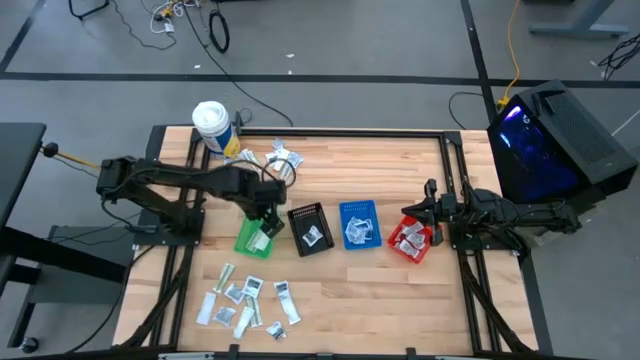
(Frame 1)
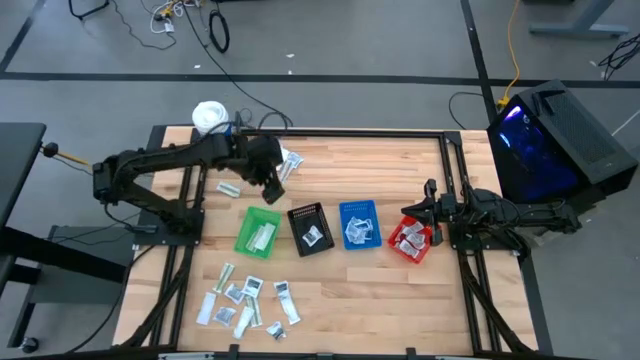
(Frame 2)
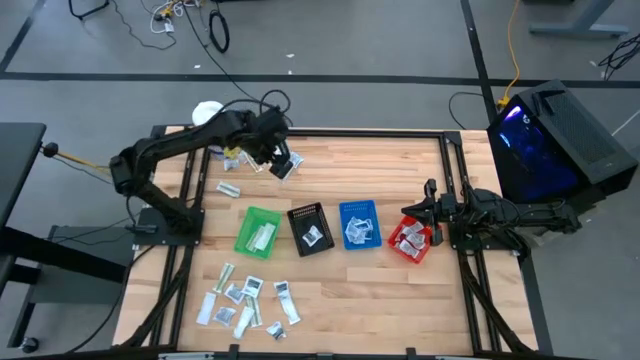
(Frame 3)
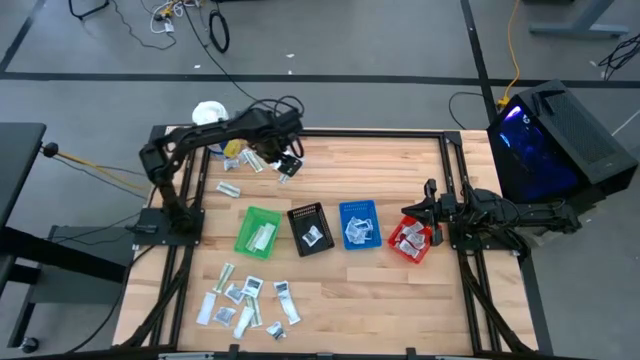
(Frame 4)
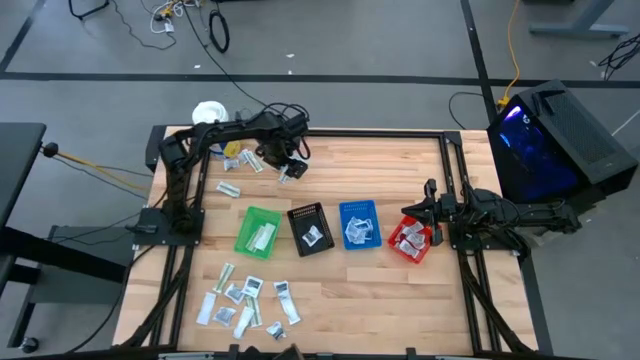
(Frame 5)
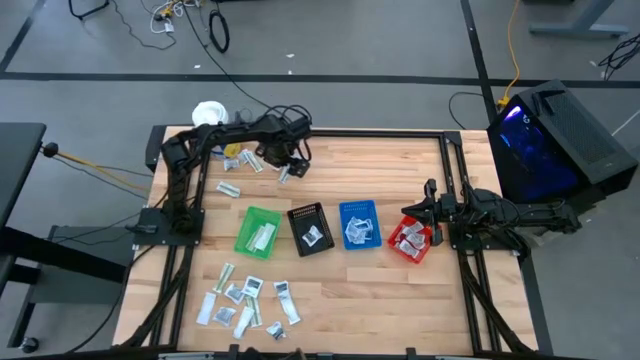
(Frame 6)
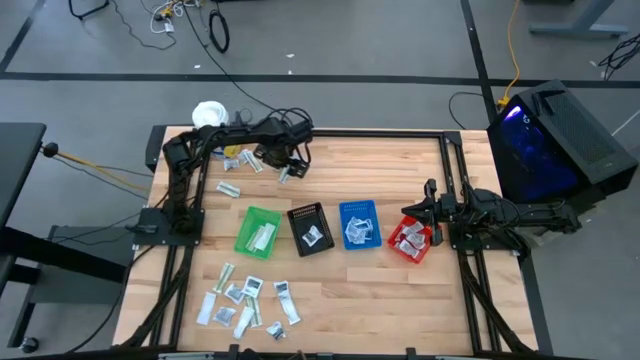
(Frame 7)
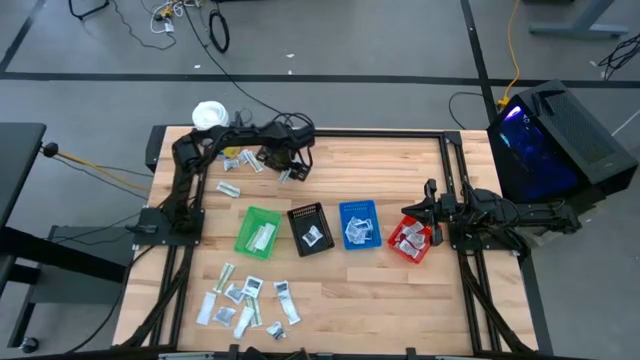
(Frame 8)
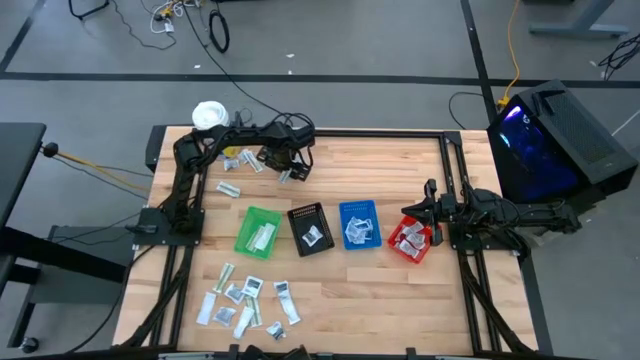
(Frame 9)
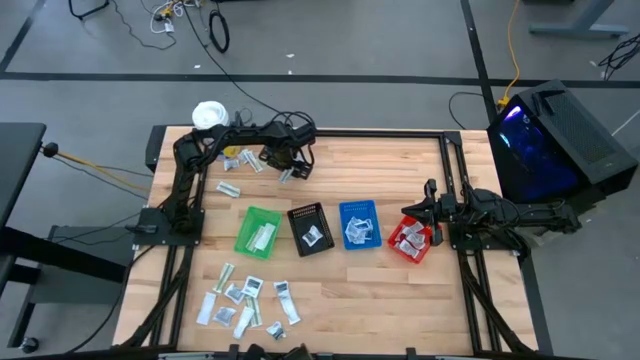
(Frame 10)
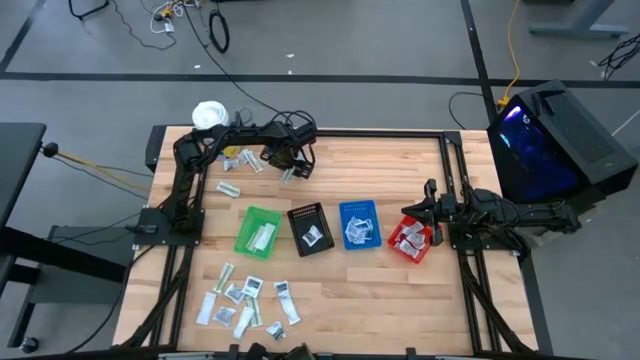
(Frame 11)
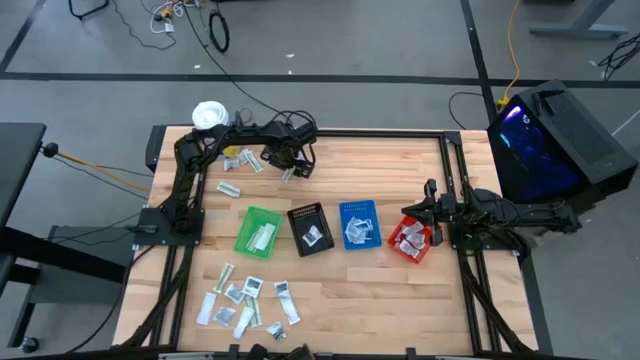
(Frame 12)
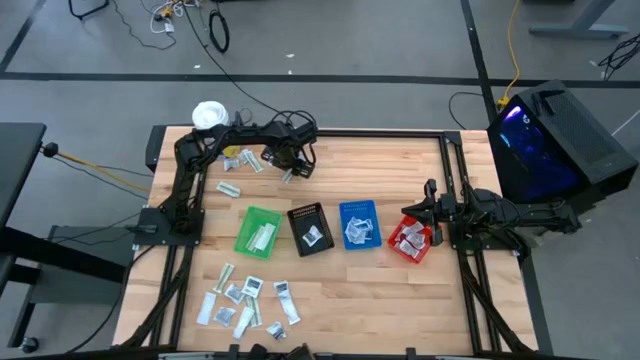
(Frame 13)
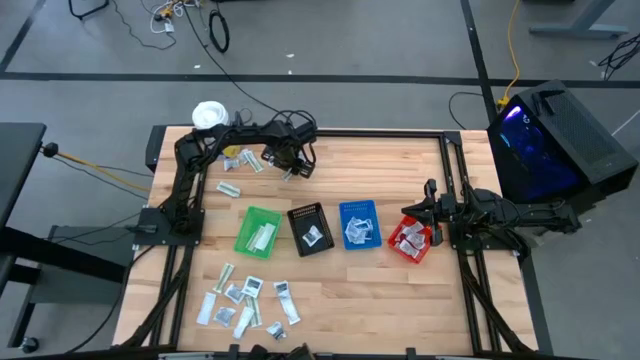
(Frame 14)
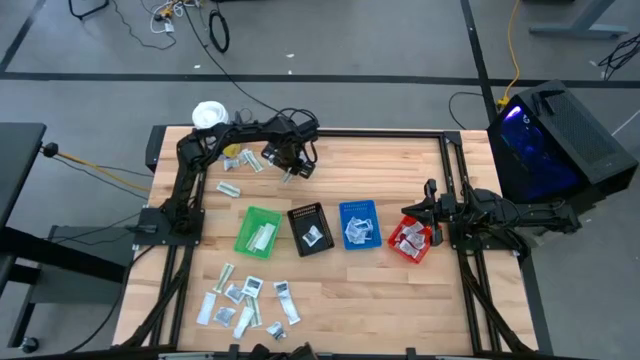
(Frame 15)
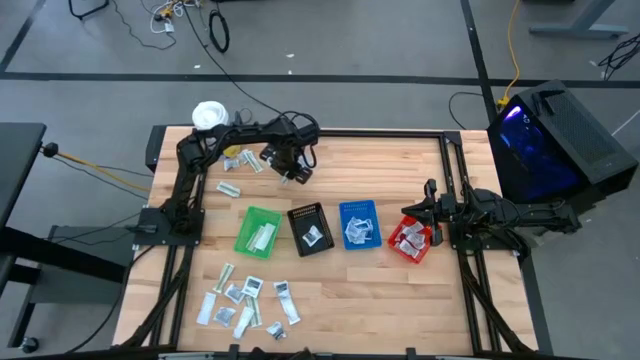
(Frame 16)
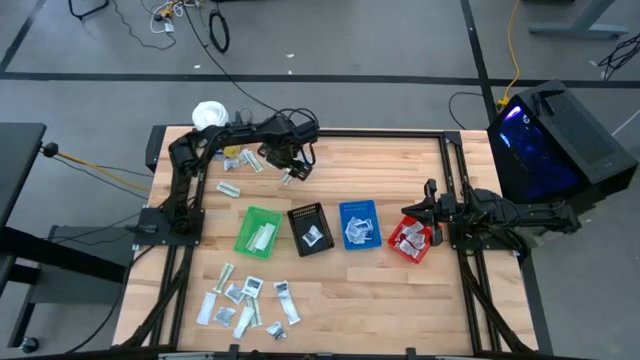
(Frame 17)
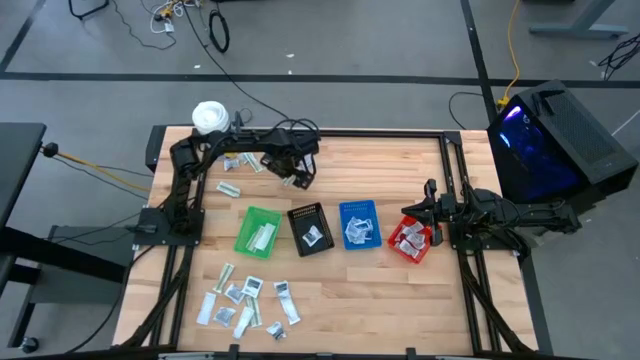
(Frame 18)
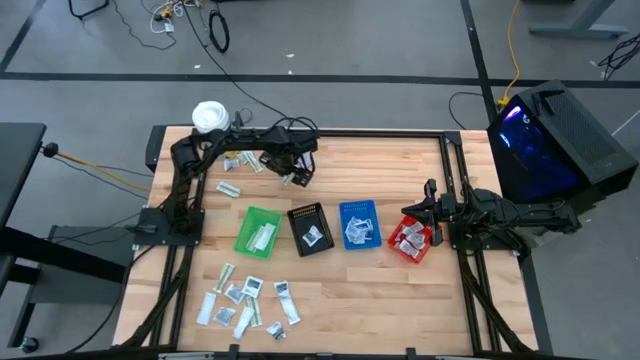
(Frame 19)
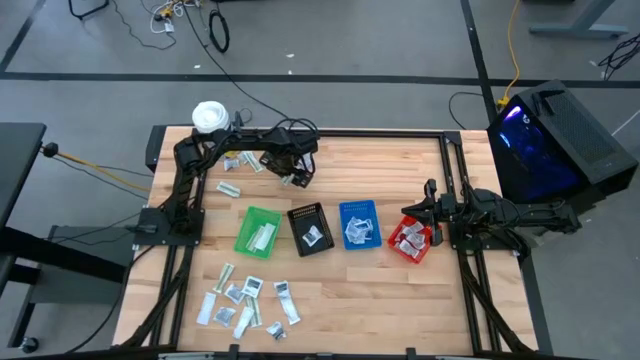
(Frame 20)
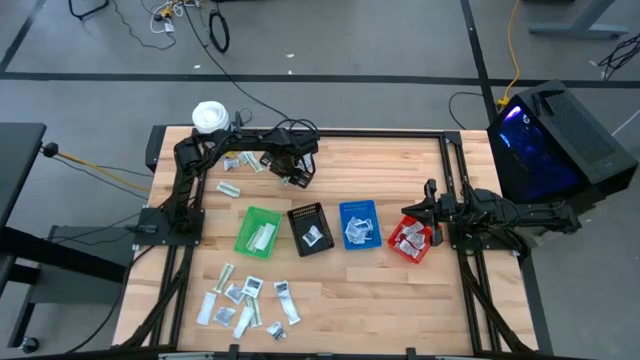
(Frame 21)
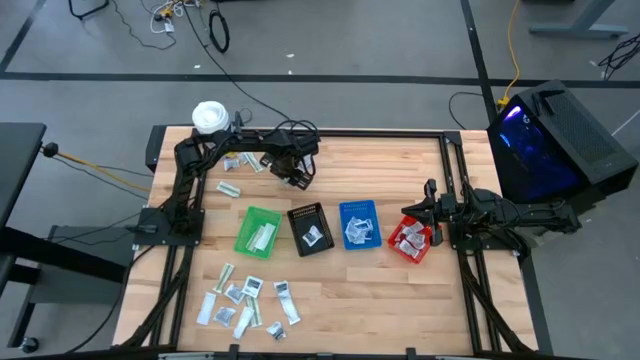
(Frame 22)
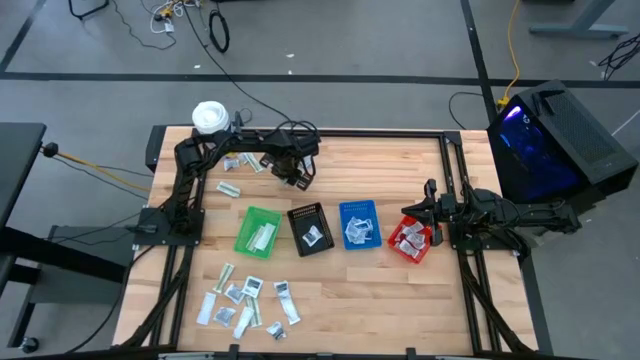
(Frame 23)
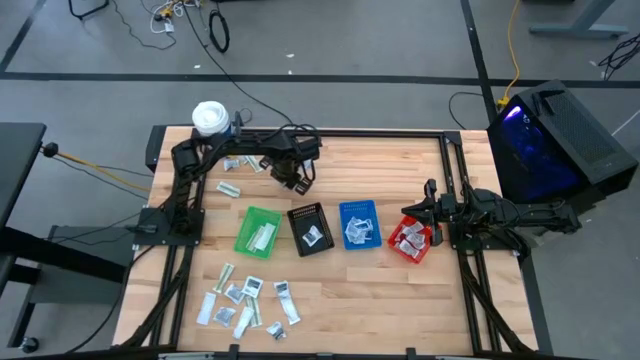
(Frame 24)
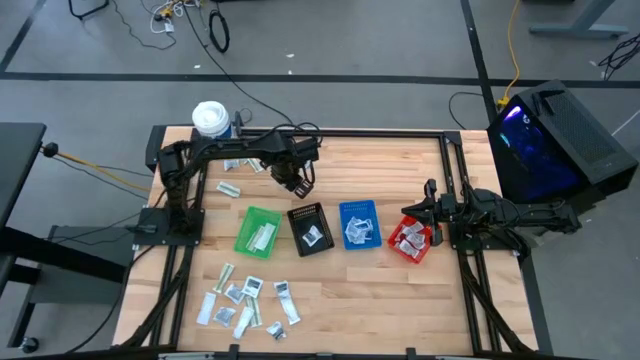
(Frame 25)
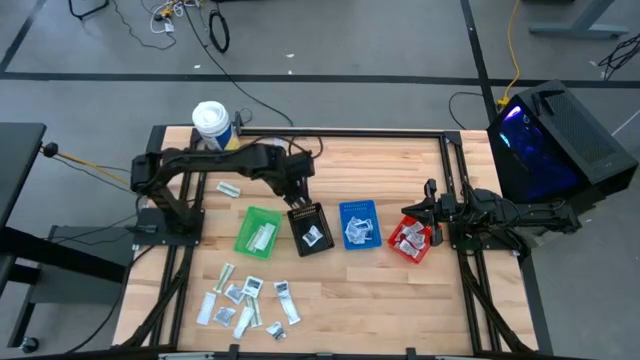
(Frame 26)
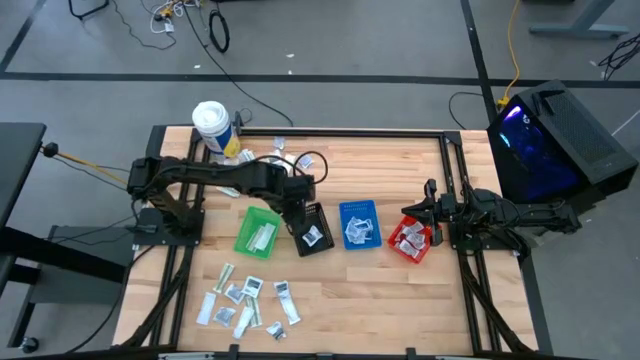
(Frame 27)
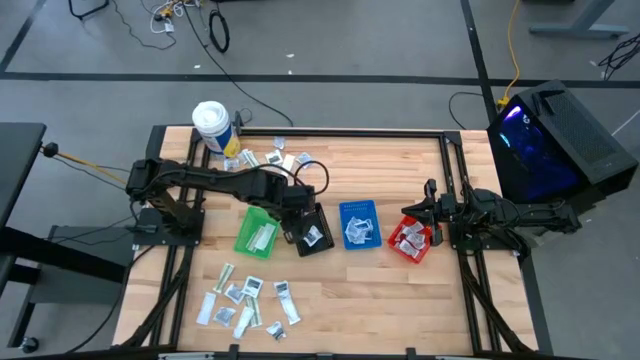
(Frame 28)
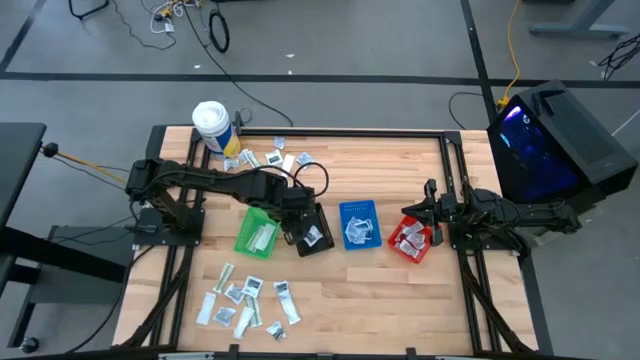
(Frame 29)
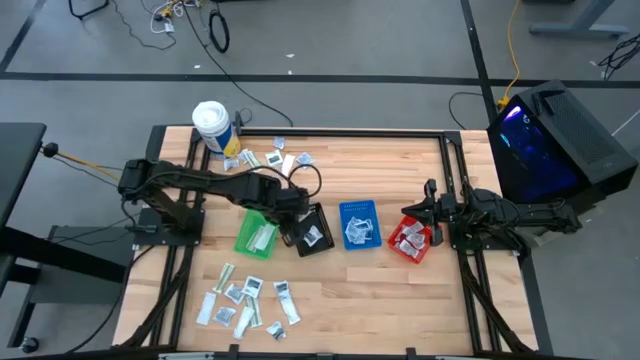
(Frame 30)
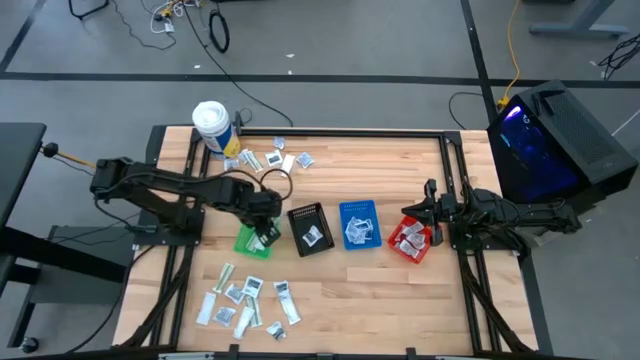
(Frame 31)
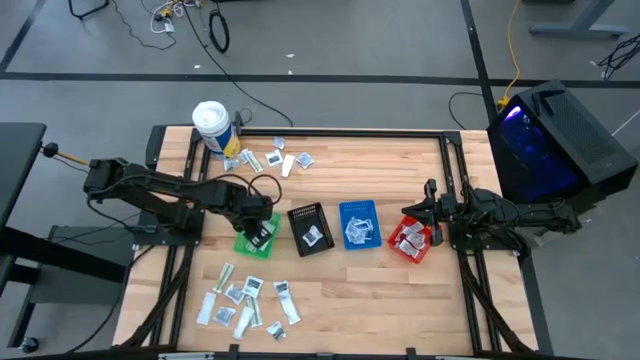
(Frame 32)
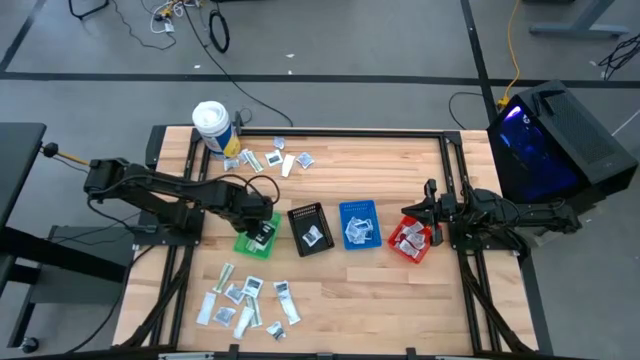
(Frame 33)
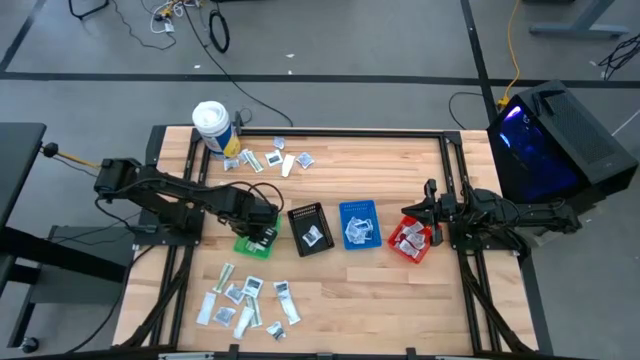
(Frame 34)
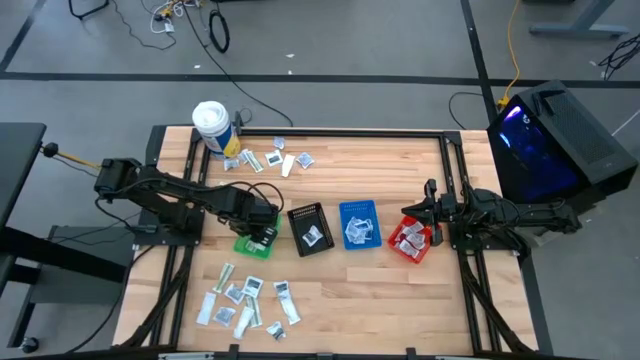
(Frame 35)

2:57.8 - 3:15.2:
Task: Pick & Place First Aid Supplies
Put the bandage into the green basket
